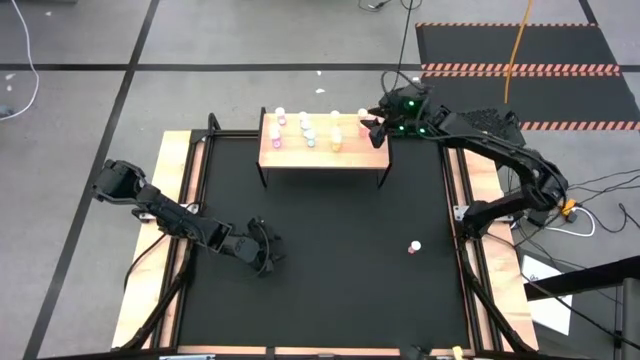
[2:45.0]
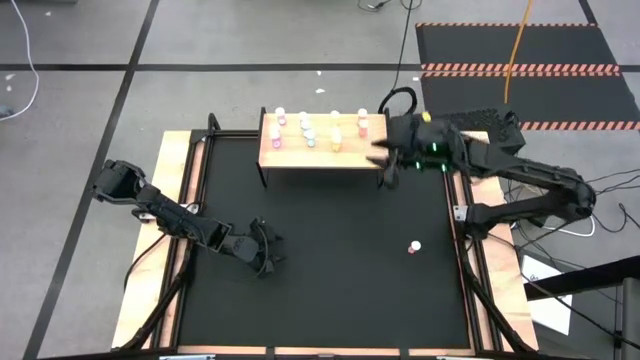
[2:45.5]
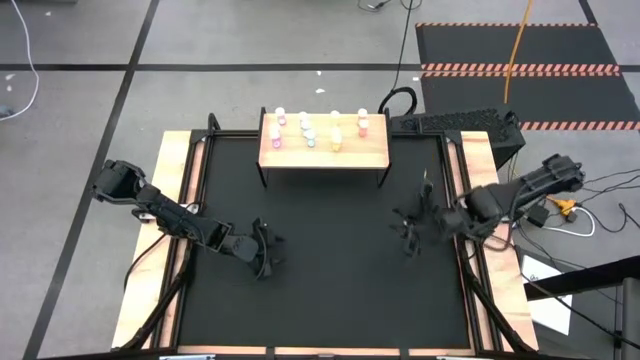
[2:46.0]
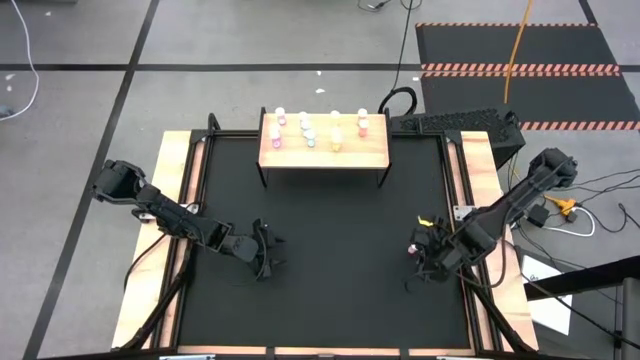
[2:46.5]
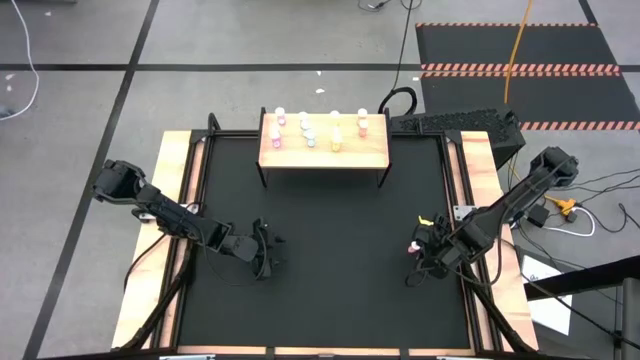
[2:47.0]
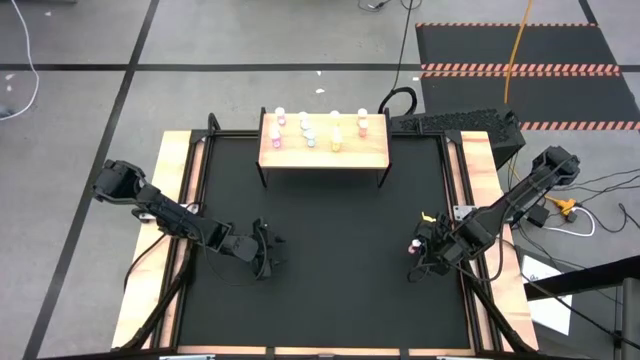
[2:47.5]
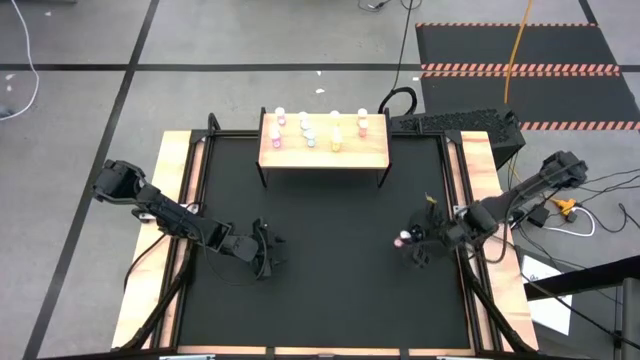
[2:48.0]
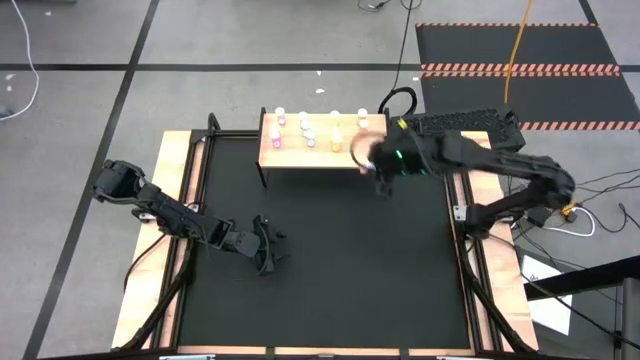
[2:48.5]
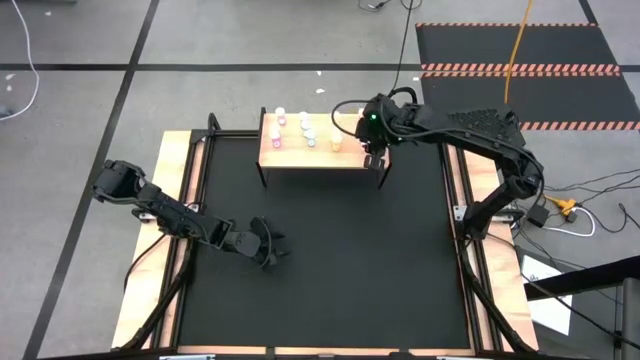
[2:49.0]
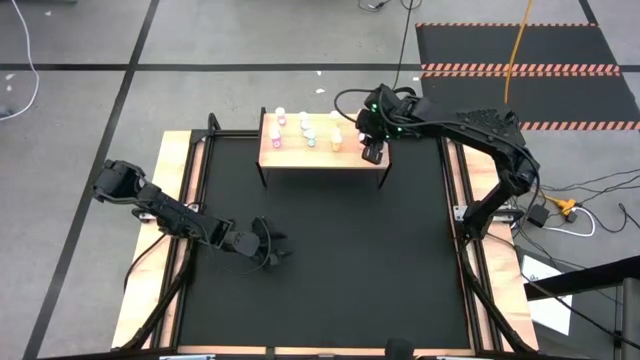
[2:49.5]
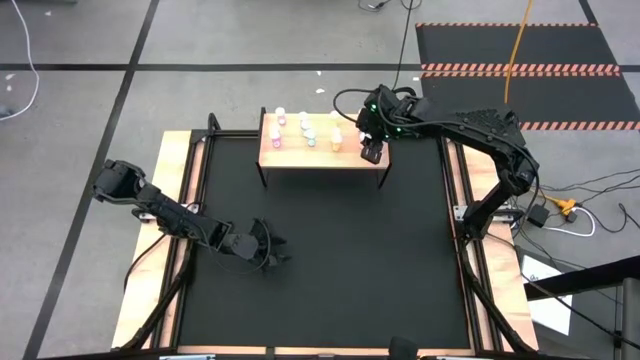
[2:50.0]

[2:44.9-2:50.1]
Task: Pick and place medicine bottles onto shelf by color
Put the pink pill bottle on the shelf aligned with the other pink pill bottles

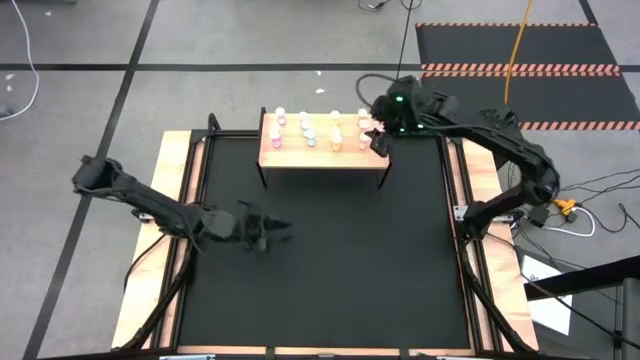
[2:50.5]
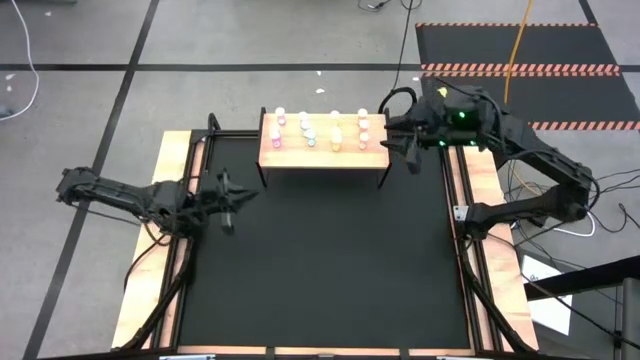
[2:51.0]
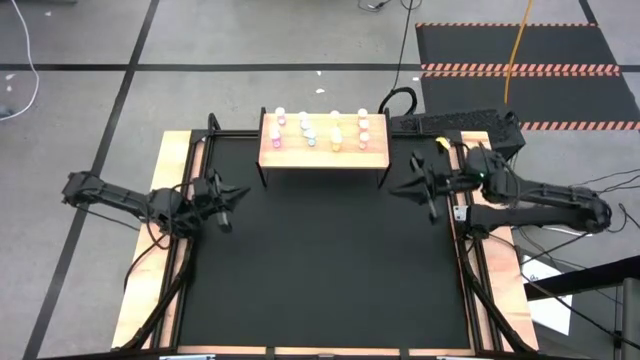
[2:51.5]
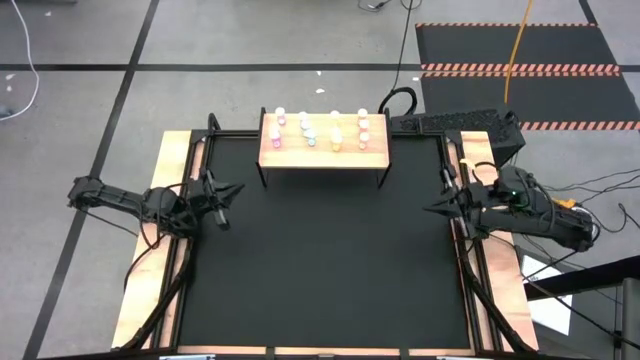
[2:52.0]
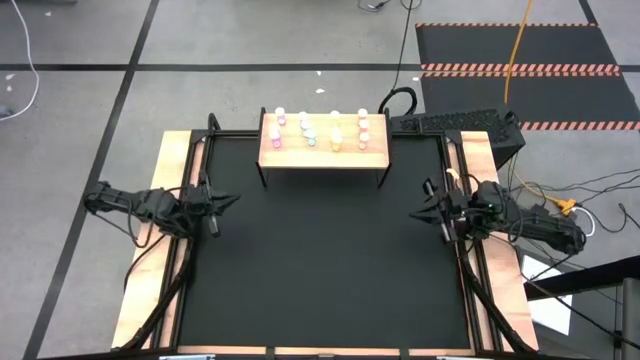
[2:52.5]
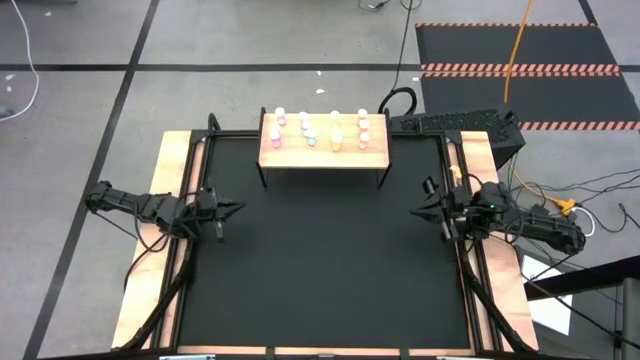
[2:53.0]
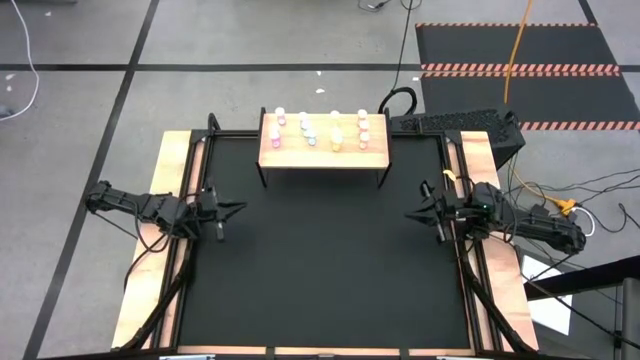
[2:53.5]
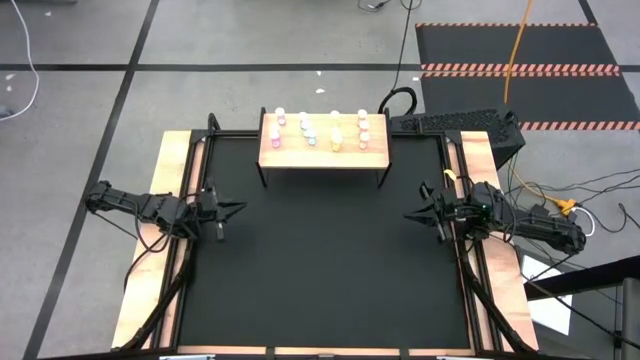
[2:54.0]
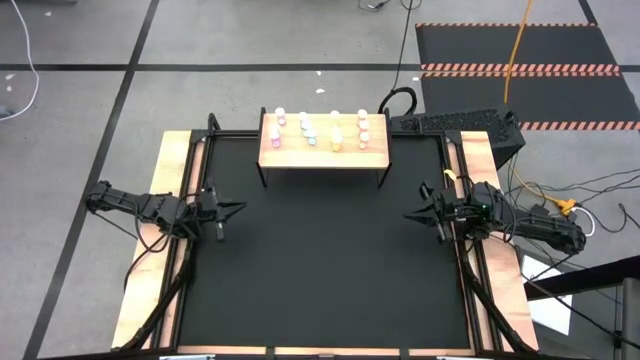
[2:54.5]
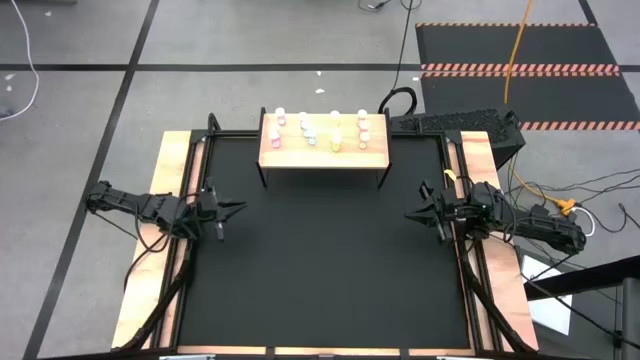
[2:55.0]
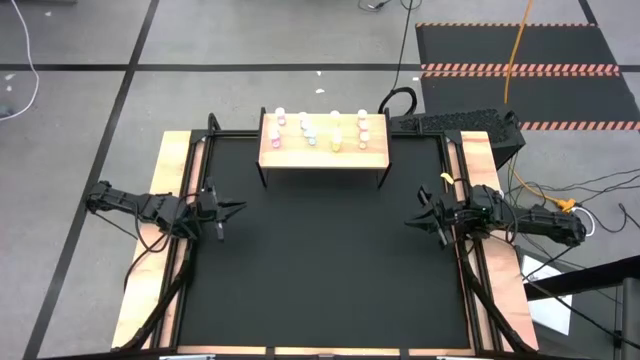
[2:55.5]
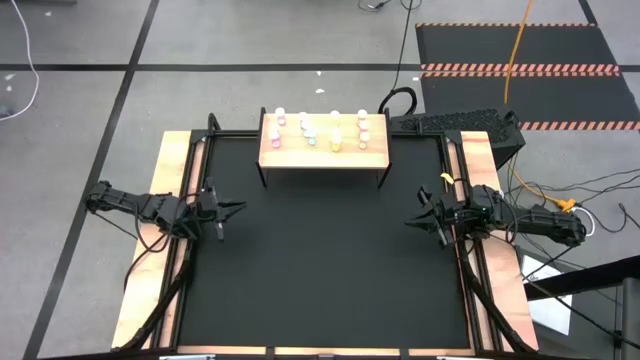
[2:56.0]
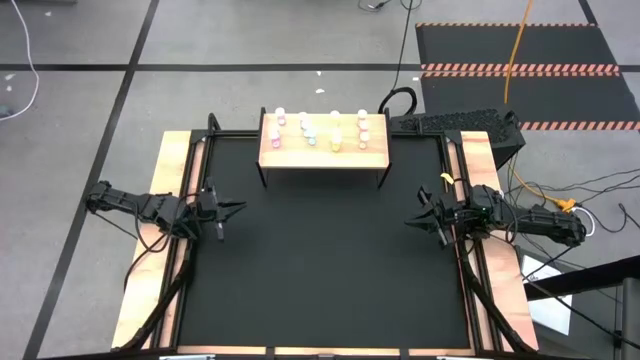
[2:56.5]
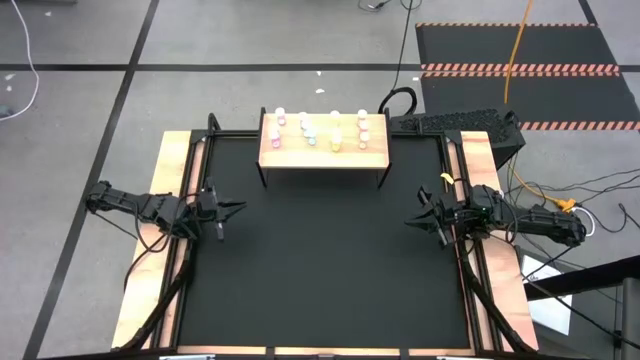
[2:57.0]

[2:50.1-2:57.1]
Return to Home Position

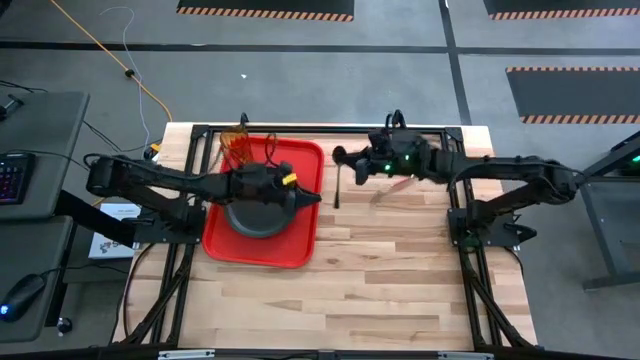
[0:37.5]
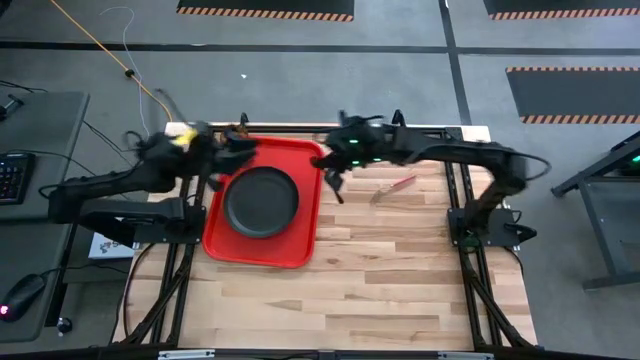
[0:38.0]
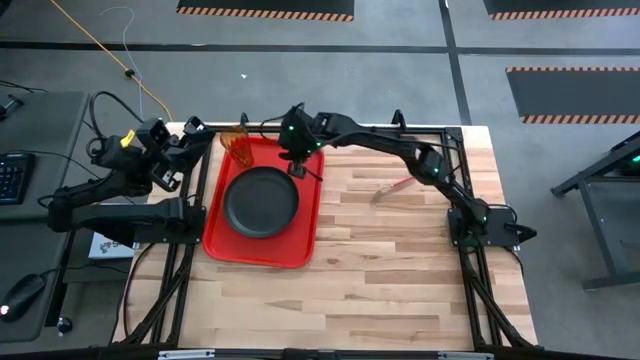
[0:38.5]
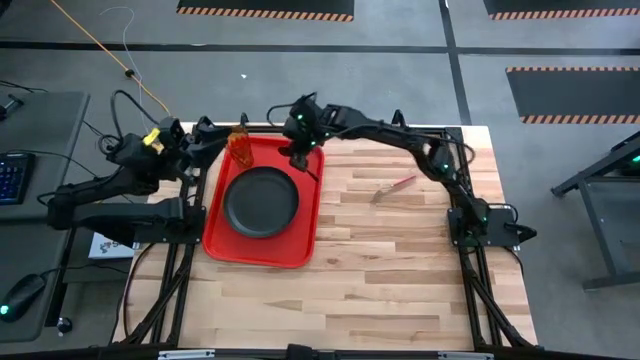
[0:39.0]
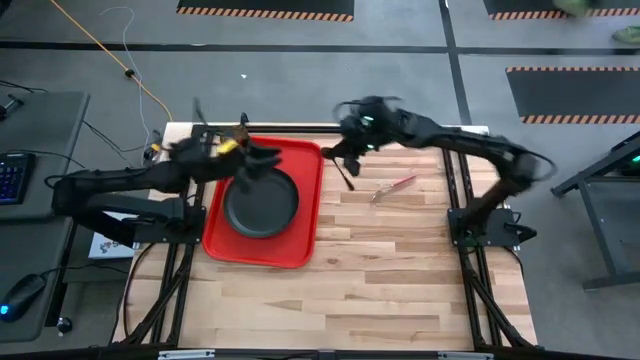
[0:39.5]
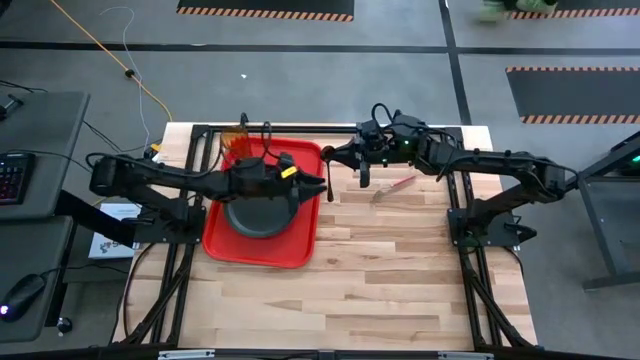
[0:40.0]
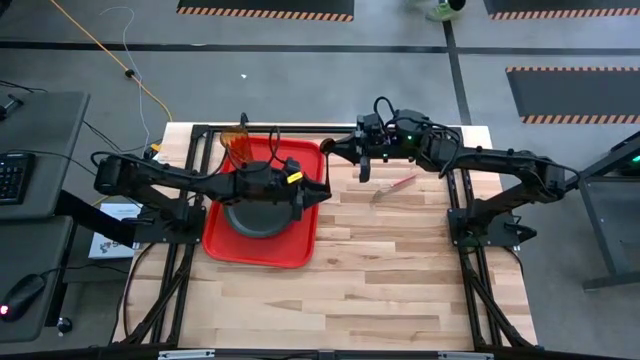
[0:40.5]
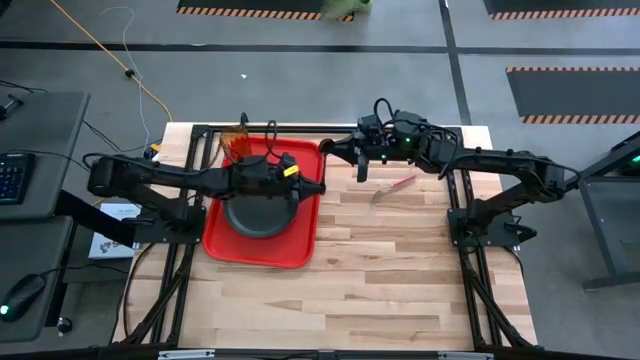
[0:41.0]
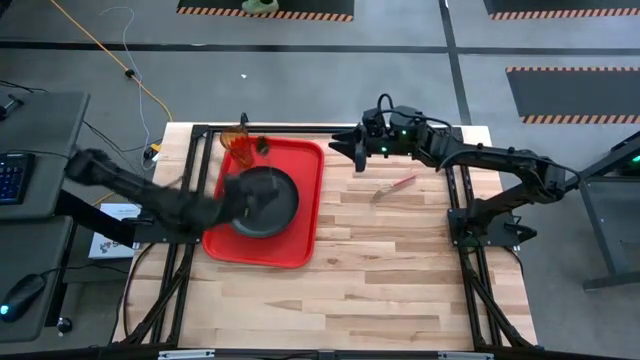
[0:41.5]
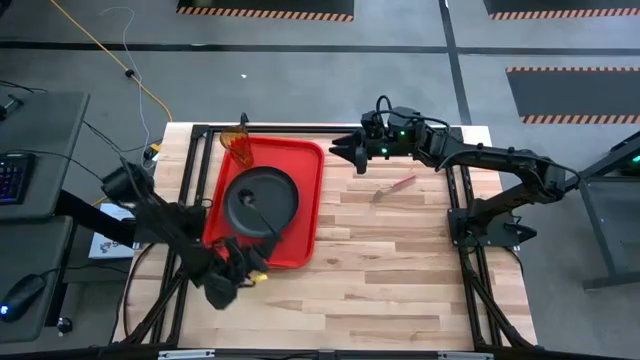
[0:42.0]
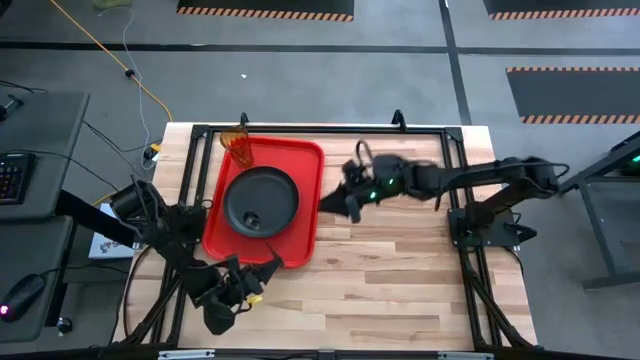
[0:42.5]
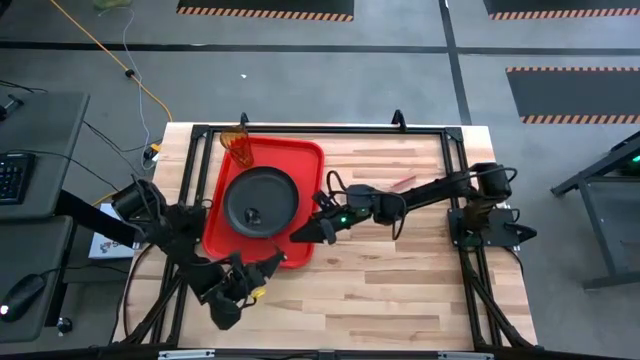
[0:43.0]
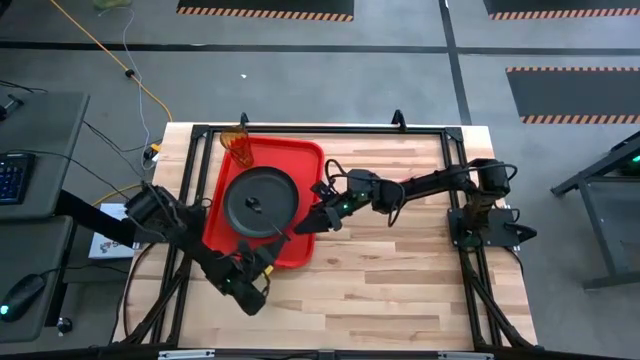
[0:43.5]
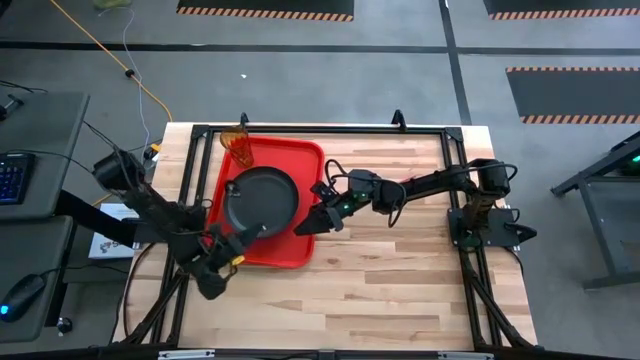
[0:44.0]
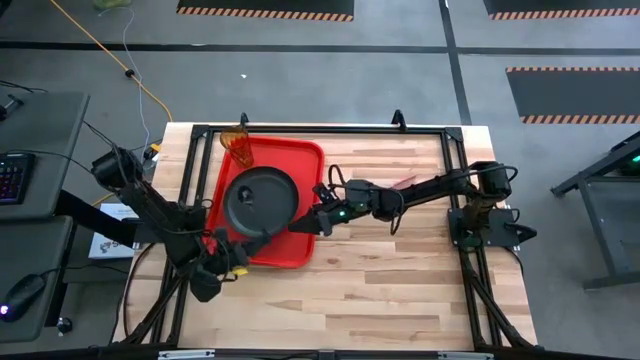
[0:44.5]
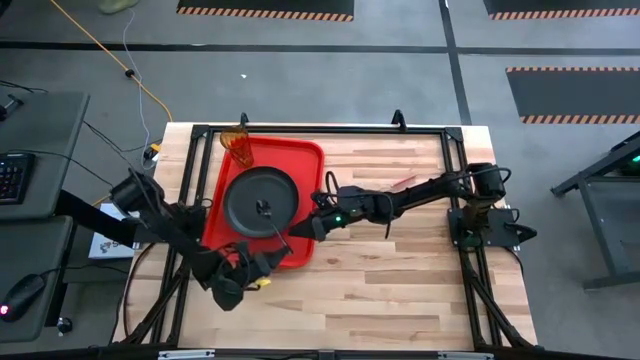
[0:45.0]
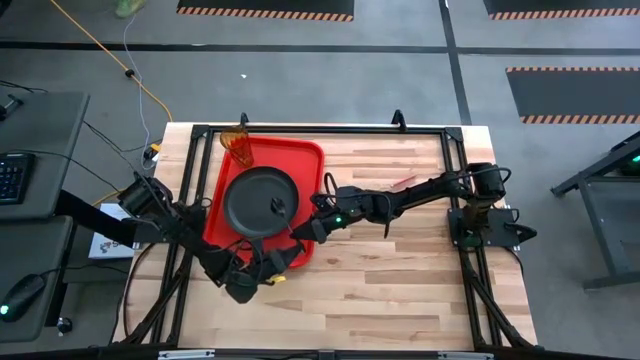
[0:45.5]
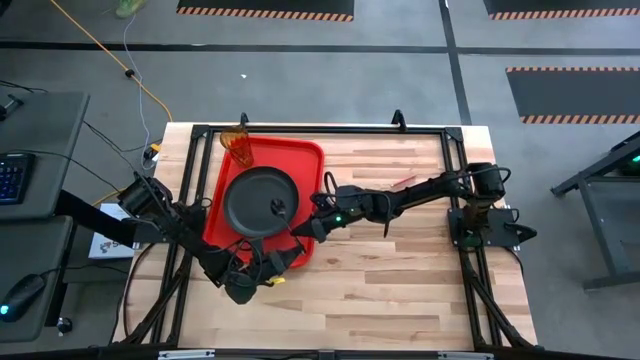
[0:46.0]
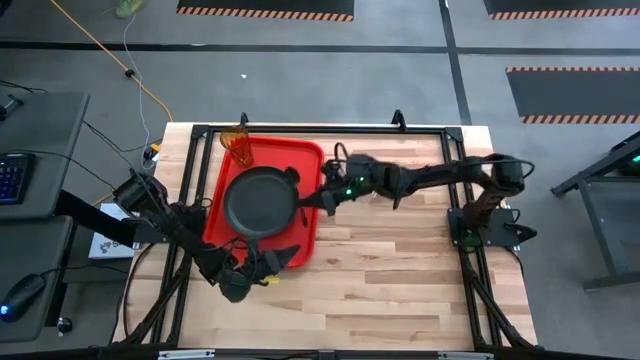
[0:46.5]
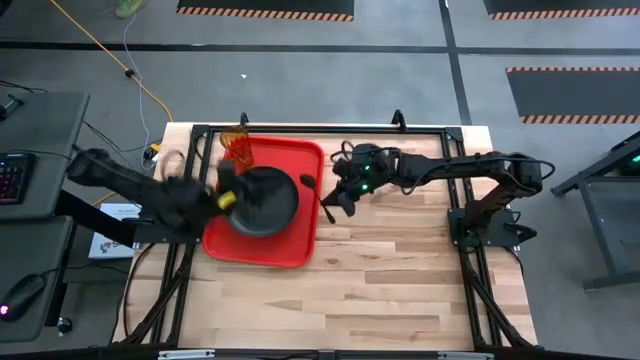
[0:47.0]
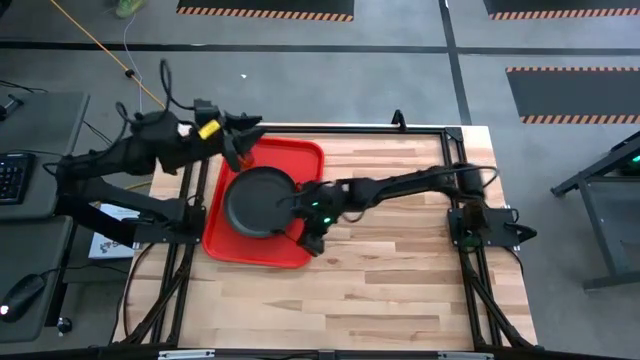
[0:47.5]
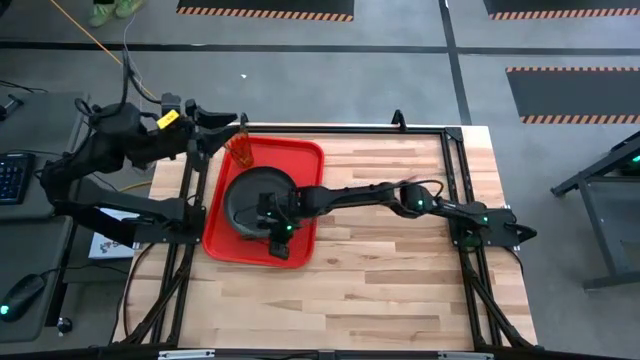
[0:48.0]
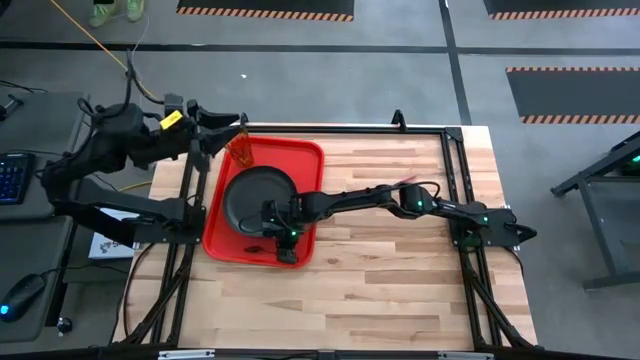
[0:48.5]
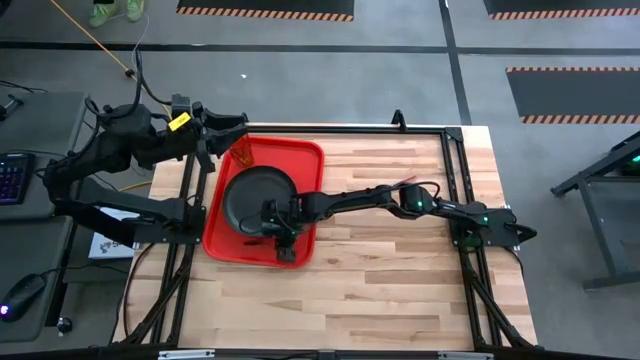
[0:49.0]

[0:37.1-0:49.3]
Task: Pick and place plate/cup/fork/spoon on tray
Put the black spoon on the red tray to the left of the red tray
